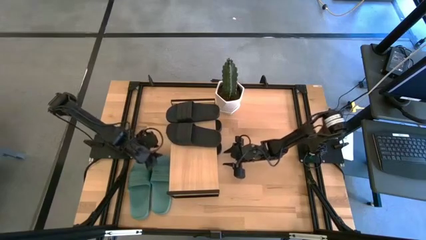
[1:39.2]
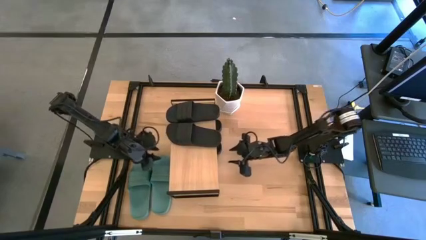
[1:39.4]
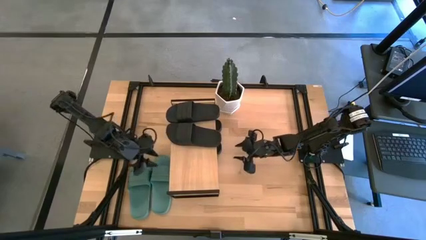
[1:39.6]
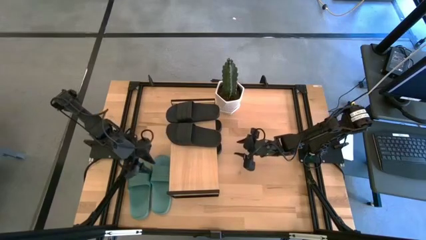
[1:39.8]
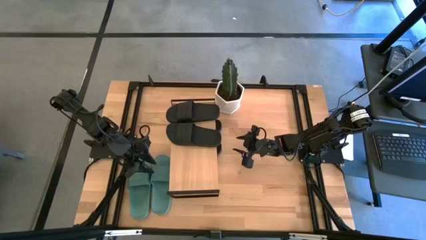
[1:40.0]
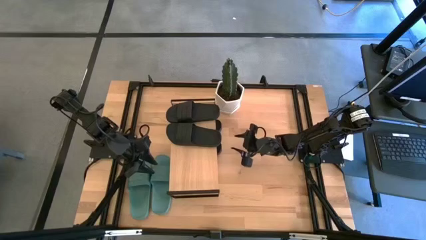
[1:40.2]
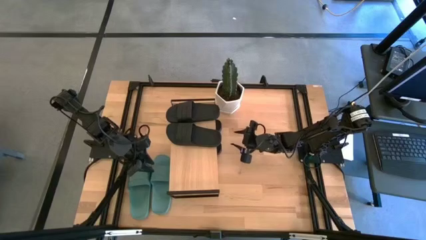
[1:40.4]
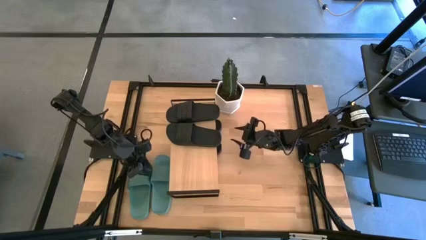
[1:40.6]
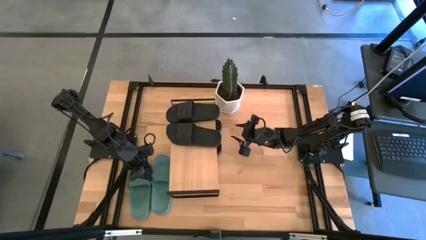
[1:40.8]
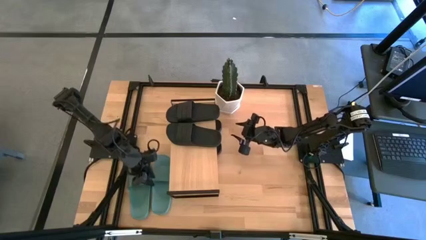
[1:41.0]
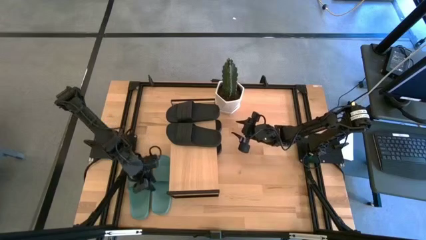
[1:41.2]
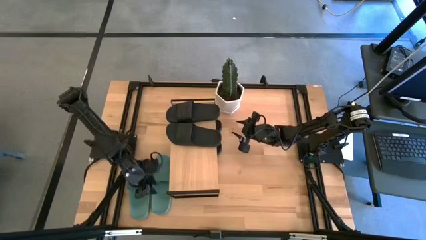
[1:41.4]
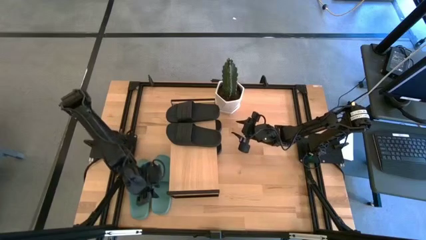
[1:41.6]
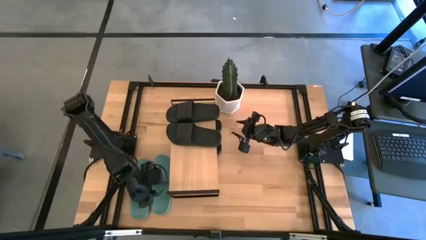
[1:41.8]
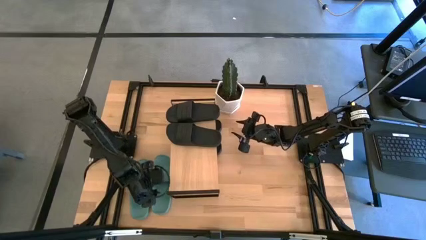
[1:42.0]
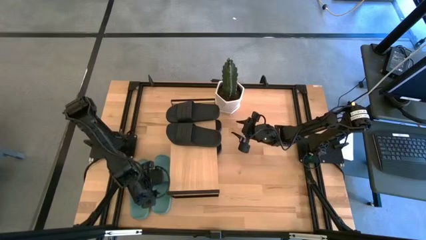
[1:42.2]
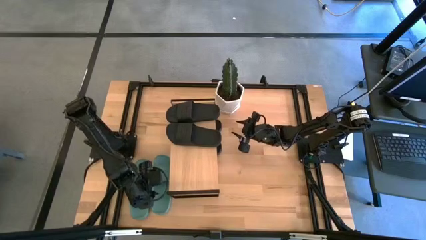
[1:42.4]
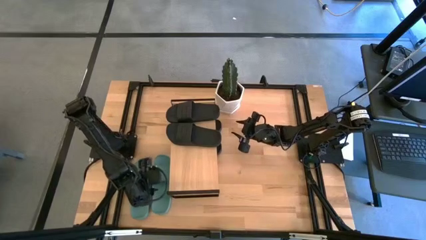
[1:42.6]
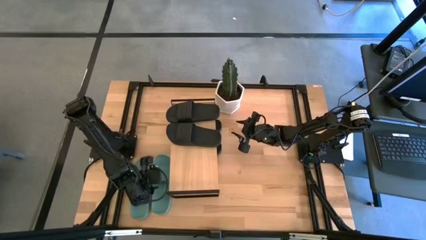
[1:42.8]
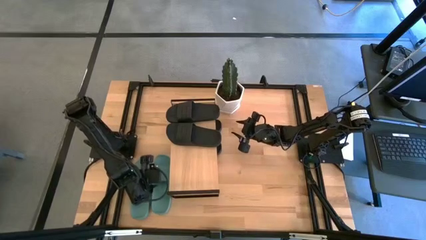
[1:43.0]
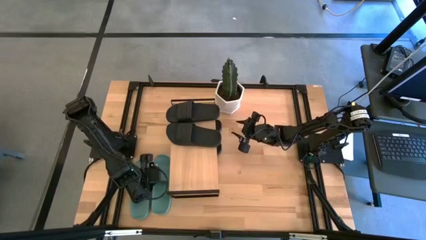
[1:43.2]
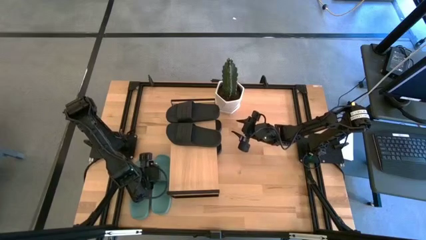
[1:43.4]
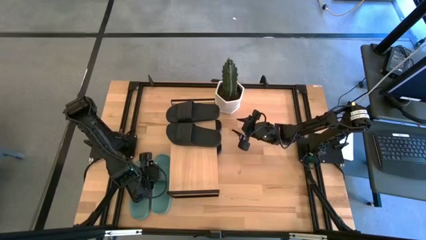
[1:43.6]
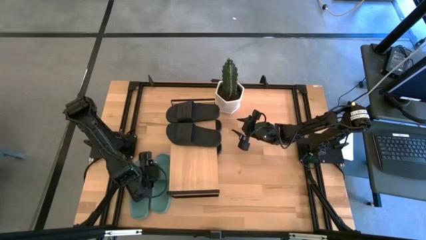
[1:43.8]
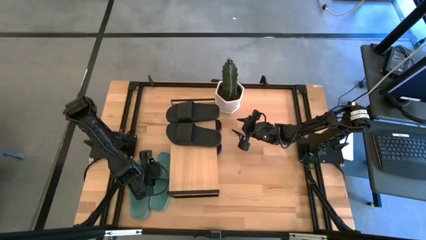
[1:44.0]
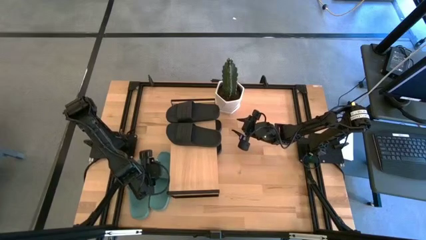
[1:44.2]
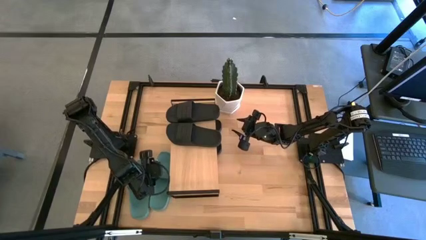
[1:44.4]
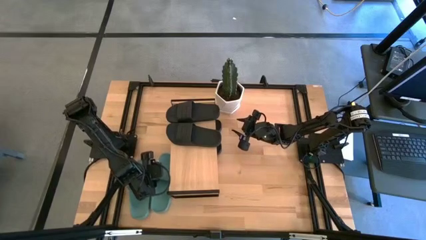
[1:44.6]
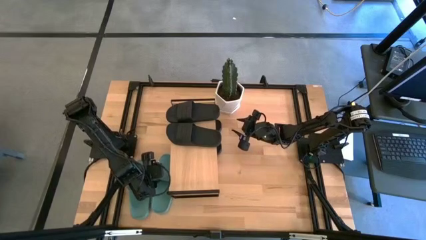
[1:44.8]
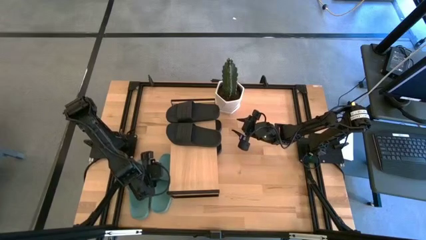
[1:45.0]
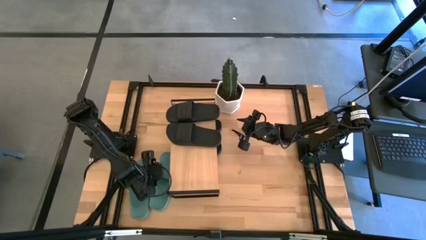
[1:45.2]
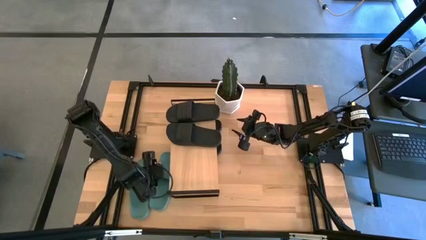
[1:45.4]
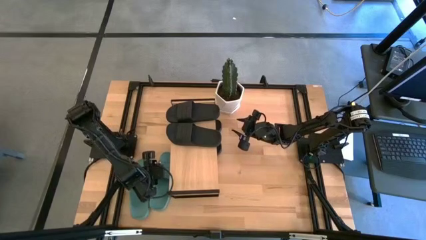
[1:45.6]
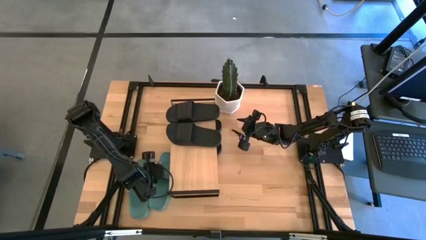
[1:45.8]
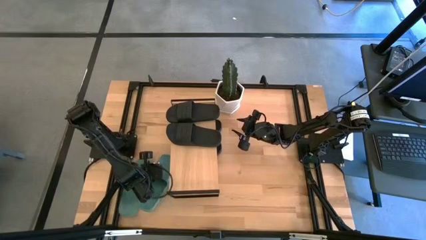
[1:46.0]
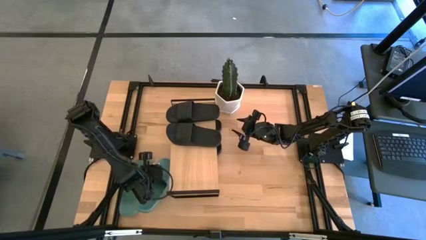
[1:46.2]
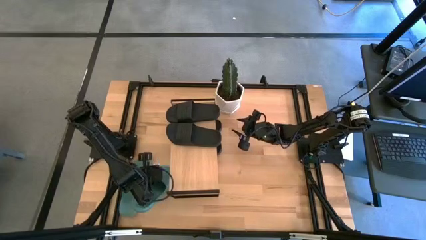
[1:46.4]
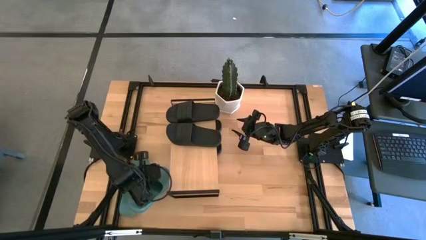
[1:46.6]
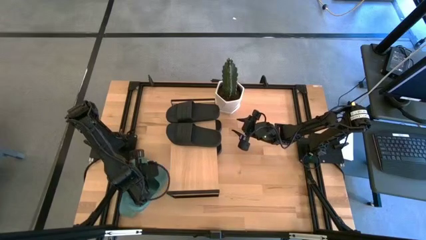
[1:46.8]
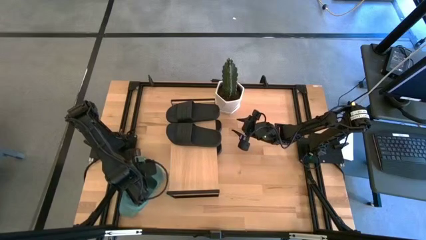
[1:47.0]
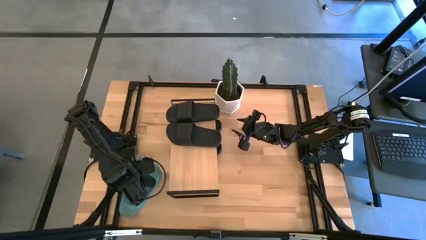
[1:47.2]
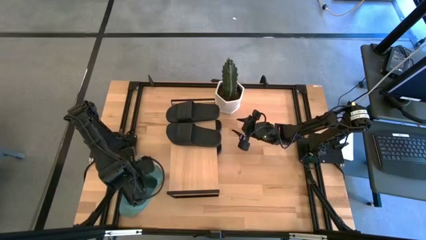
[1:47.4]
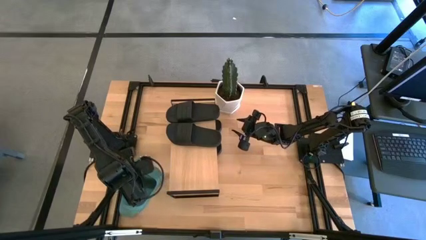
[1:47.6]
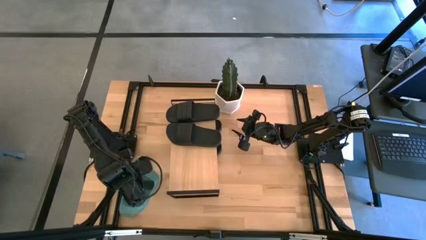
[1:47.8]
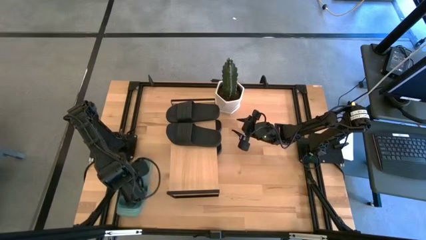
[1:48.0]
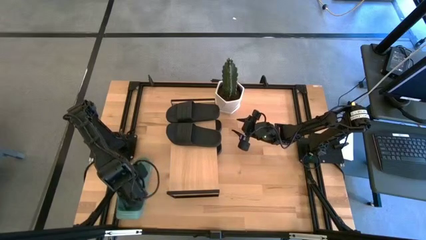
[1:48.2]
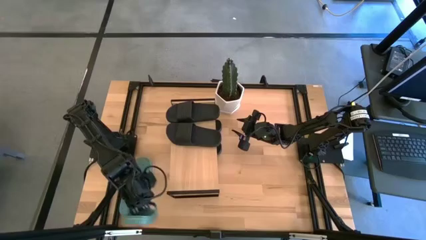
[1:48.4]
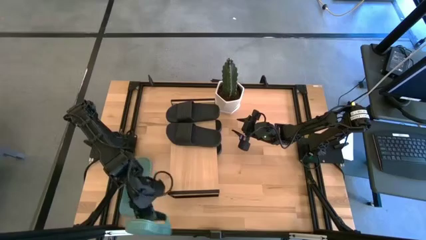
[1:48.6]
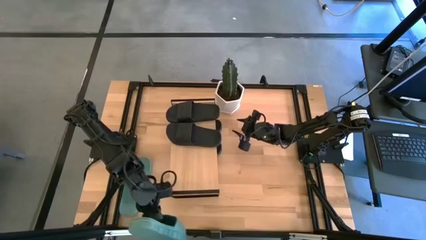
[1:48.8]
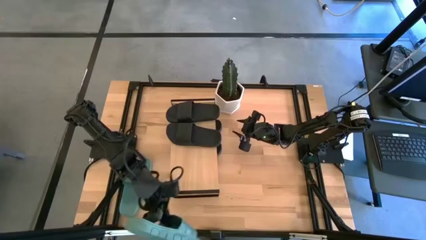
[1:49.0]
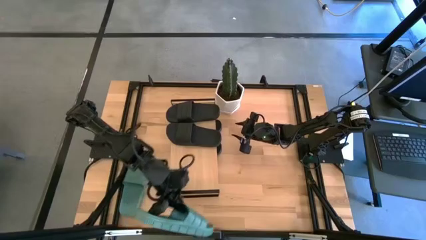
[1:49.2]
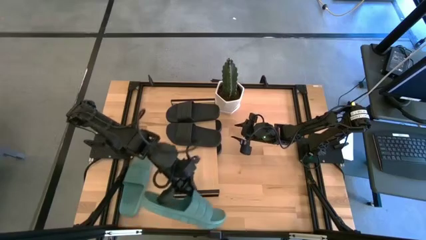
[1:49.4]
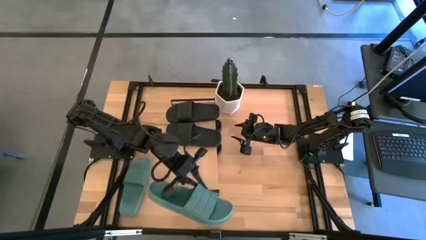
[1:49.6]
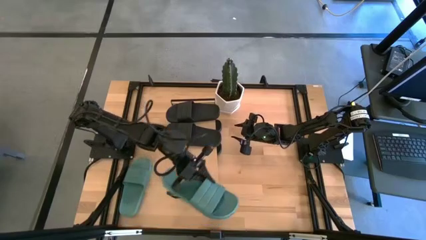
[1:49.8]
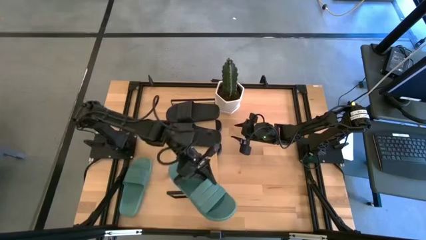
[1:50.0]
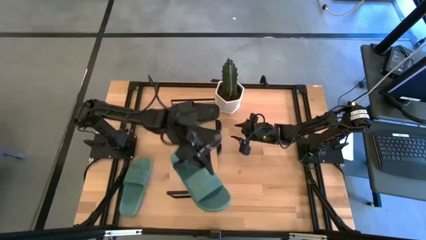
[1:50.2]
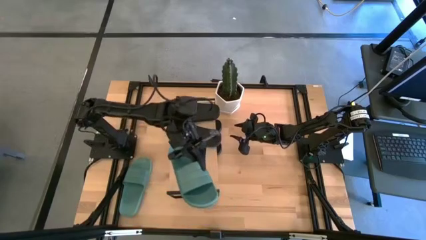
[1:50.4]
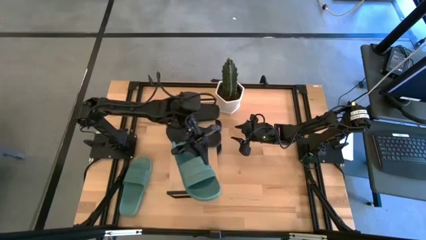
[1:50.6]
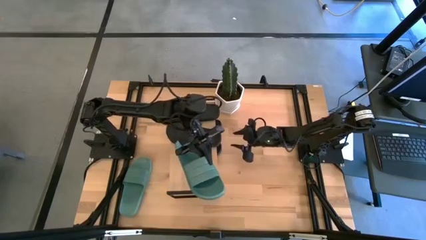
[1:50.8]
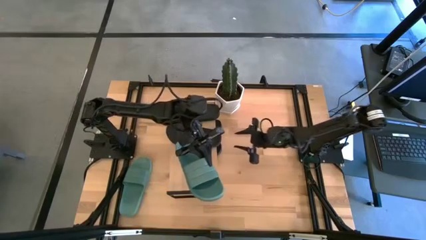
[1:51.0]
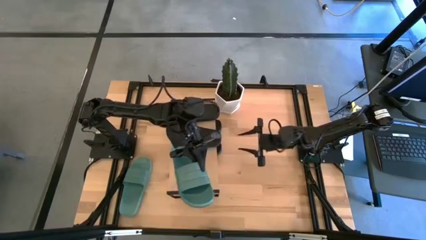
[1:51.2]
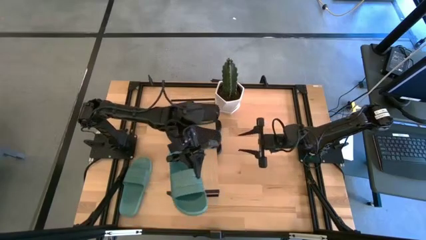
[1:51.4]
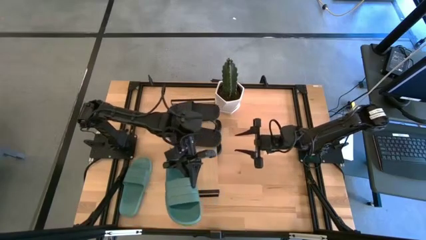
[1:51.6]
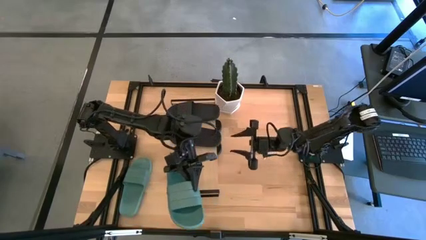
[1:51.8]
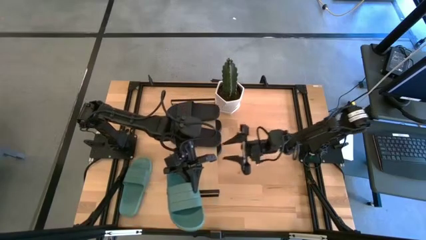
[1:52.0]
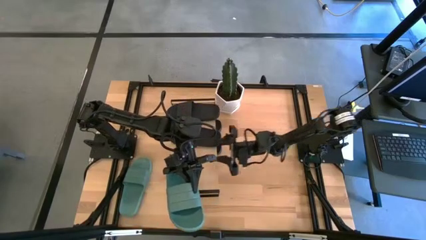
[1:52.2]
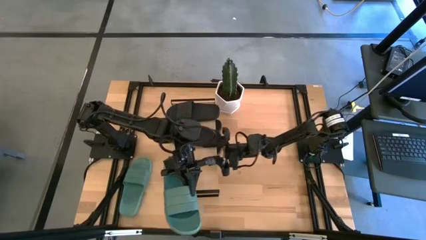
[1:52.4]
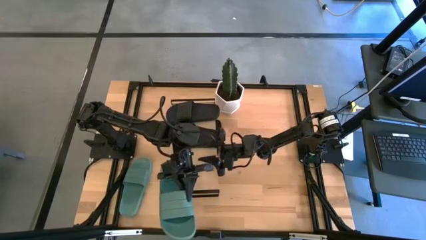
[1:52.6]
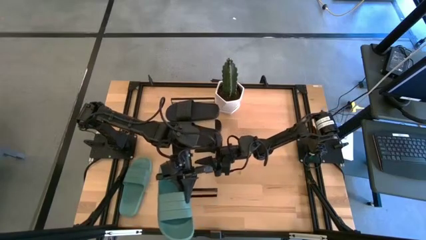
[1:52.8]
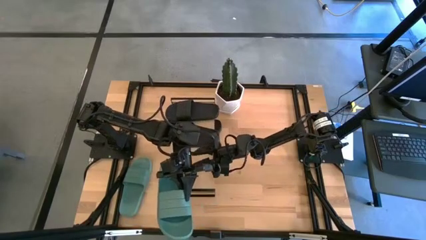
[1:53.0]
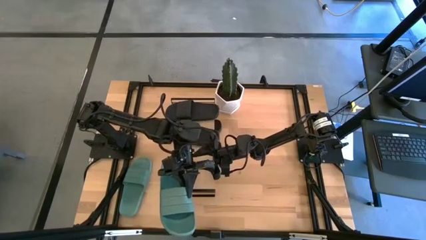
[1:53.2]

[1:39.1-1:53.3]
Task: Pick and place slides into the shelf
Put the green slides under the shelf
